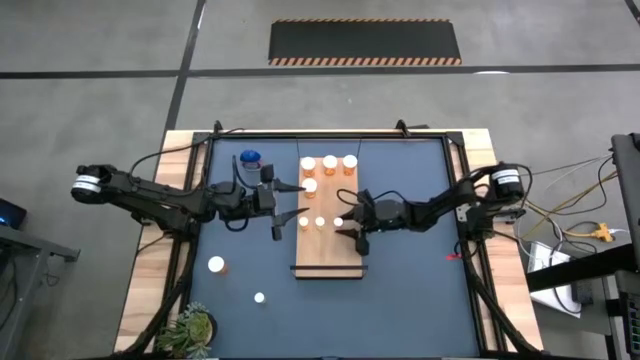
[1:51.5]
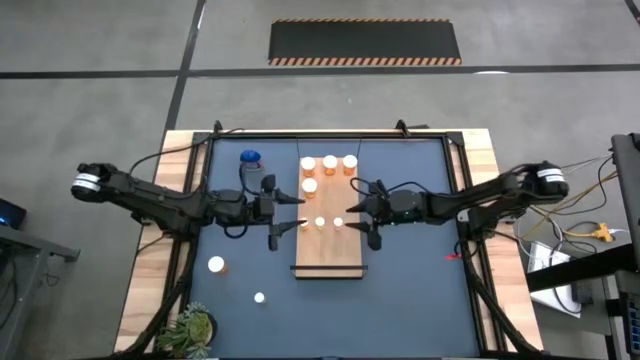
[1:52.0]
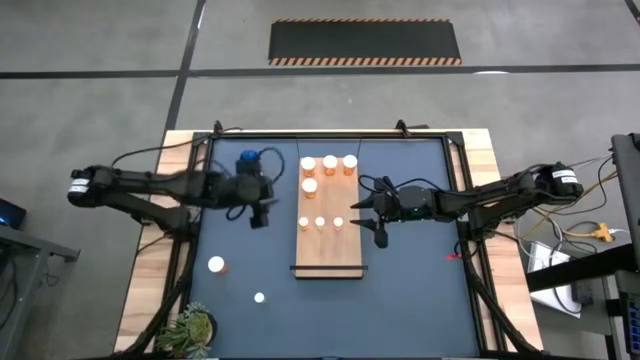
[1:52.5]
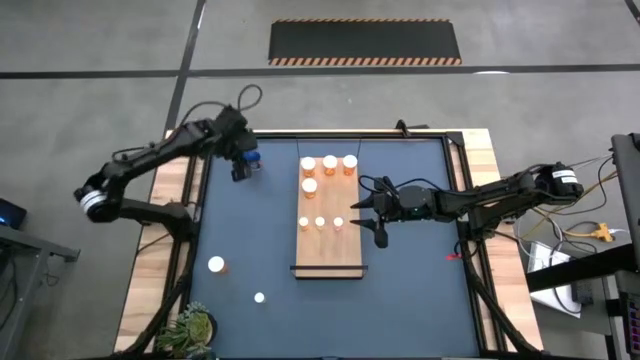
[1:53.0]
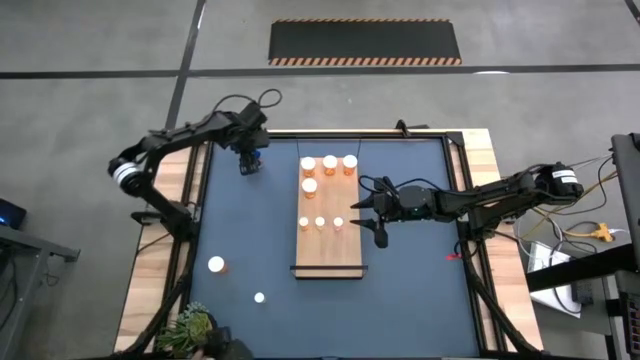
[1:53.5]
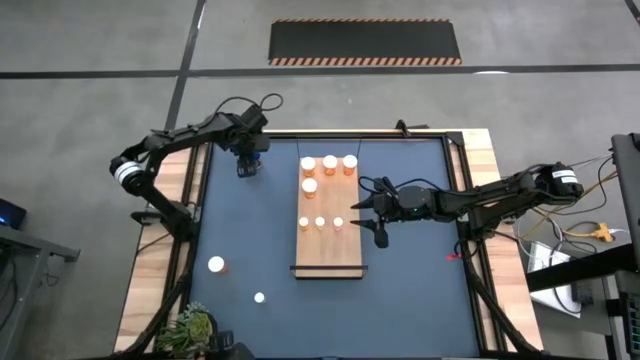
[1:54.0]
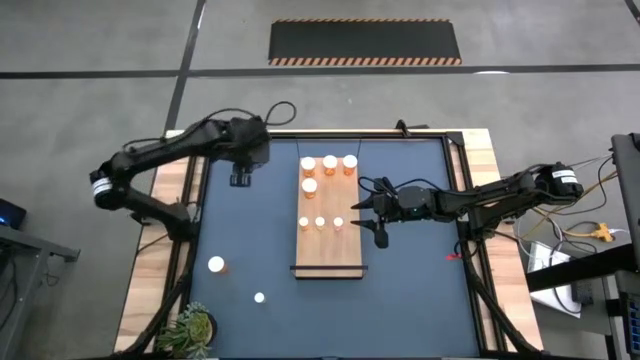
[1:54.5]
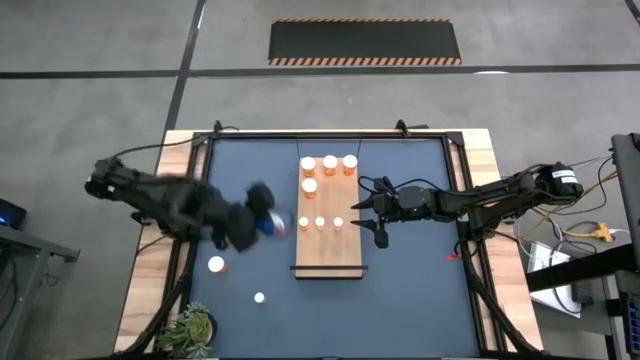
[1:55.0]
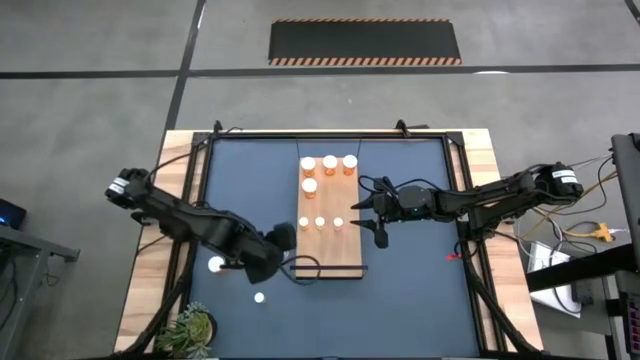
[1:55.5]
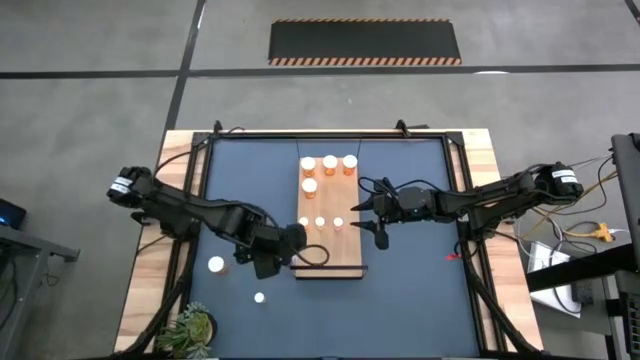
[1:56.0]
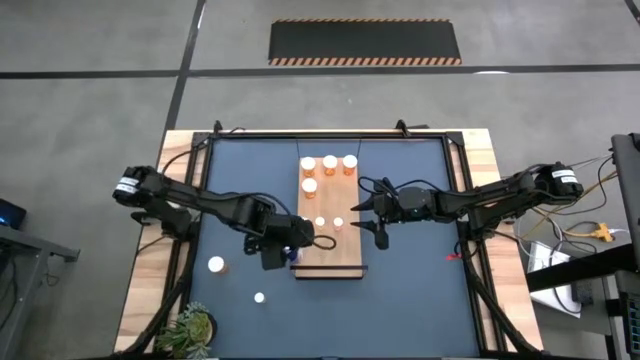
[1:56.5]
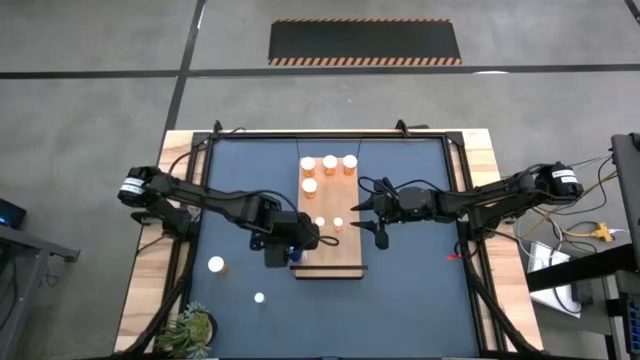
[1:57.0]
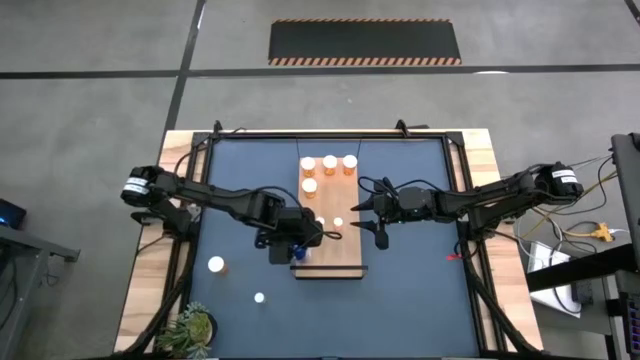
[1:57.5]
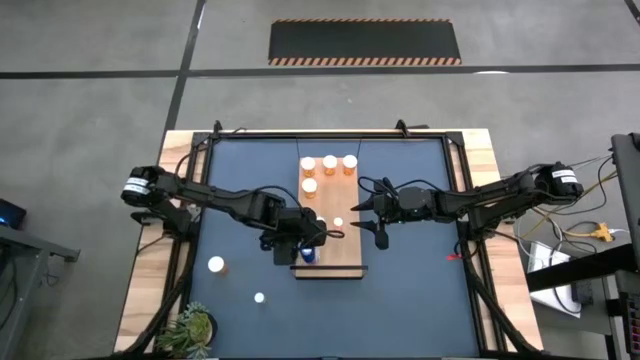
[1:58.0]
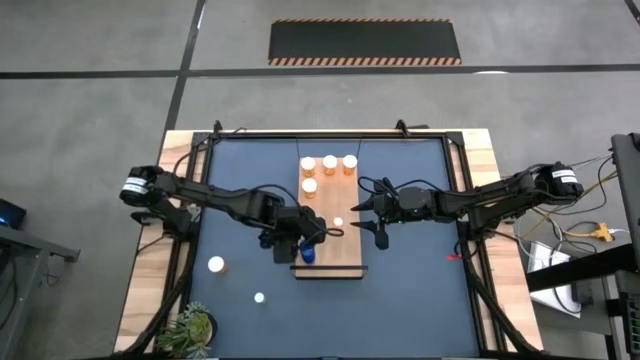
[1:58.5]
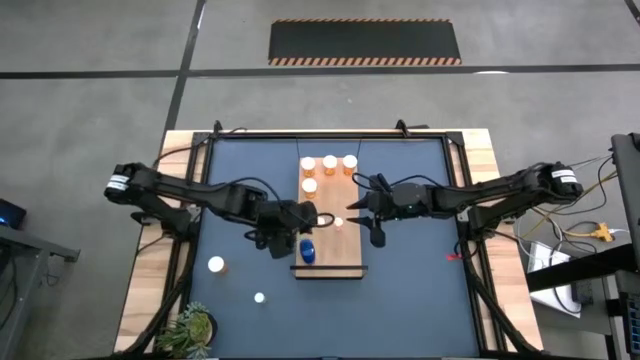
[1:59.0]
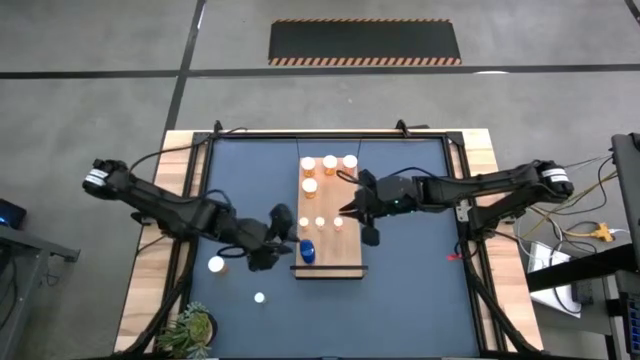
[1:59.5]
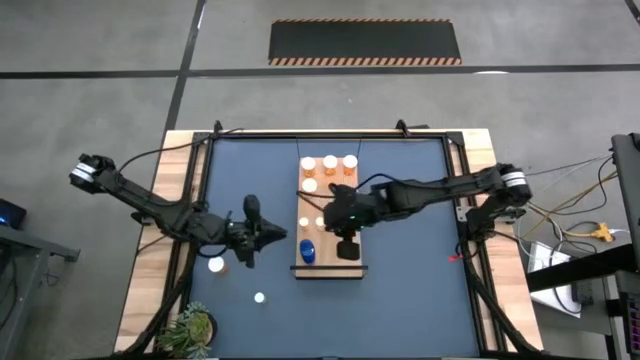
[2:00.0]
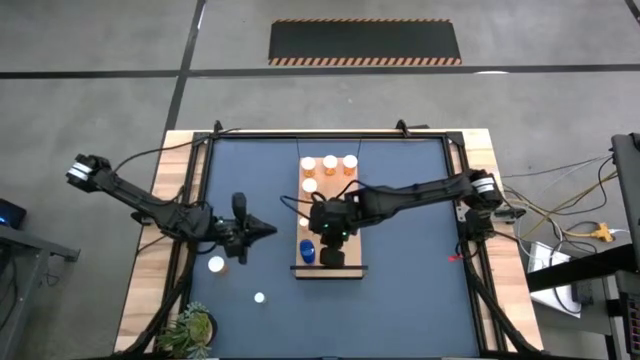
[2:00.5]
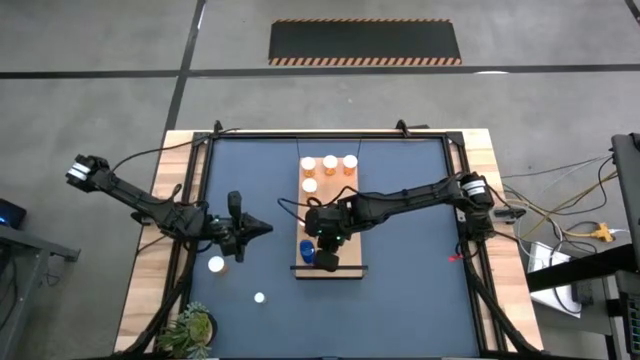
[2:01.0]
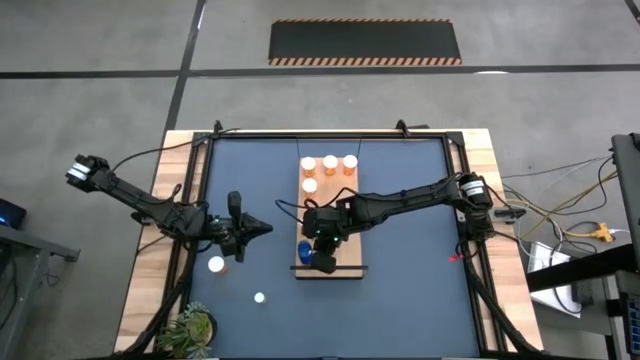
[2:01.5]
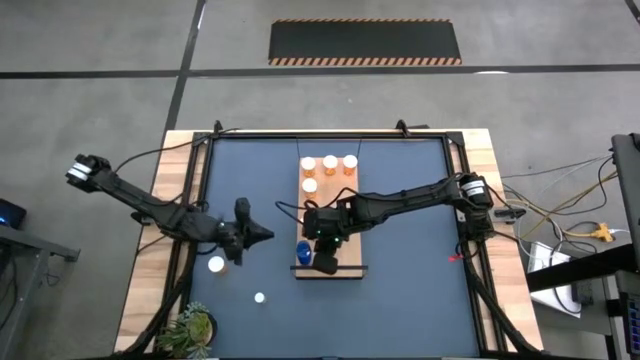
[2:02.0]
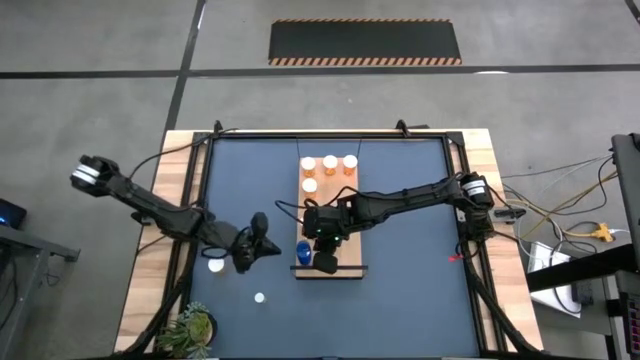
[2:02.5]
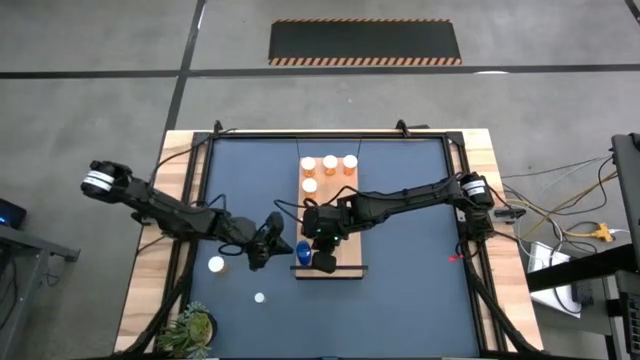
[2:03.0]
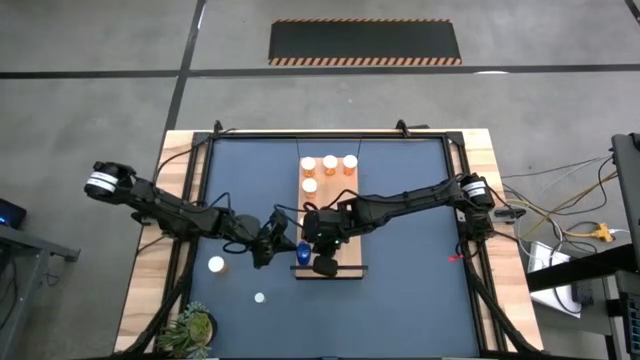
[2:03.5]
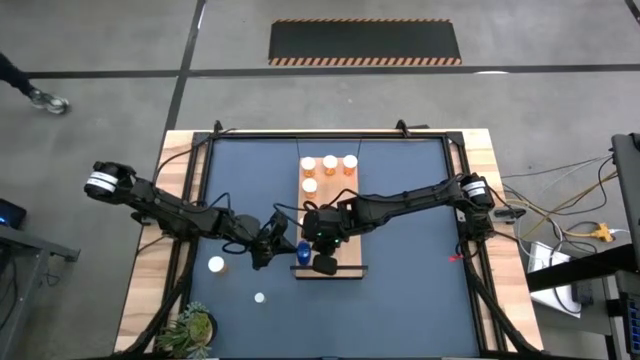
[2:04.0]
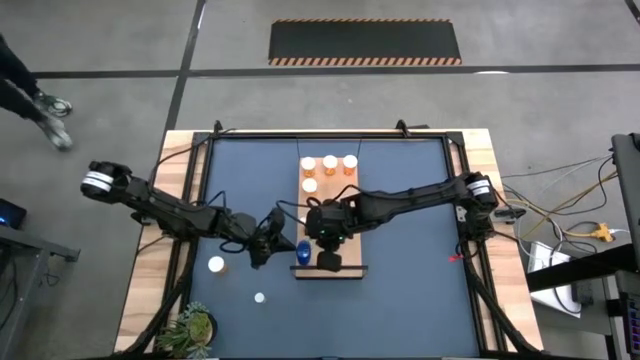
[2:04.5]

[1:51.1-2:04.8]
Task: Pick and place medicine bottles onto shelf by color
Put the blue pill bottle on the shelf

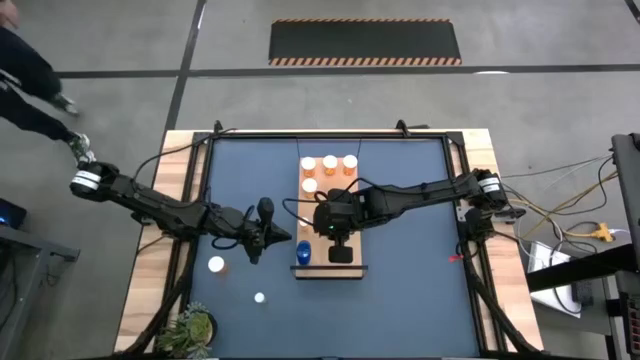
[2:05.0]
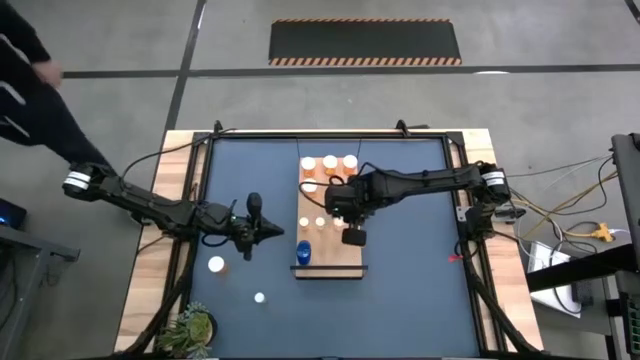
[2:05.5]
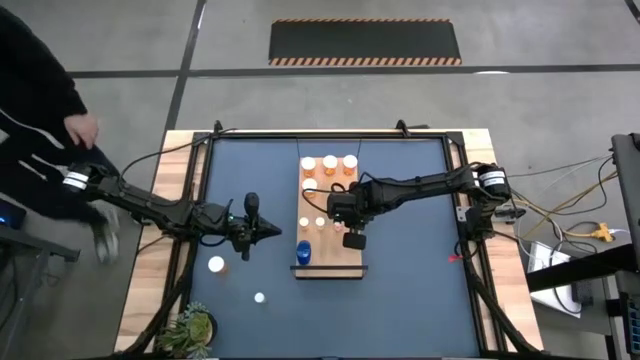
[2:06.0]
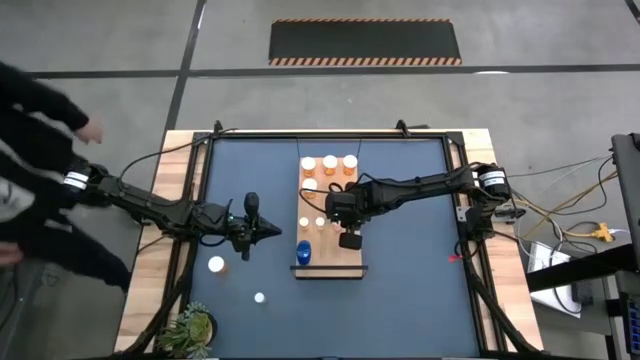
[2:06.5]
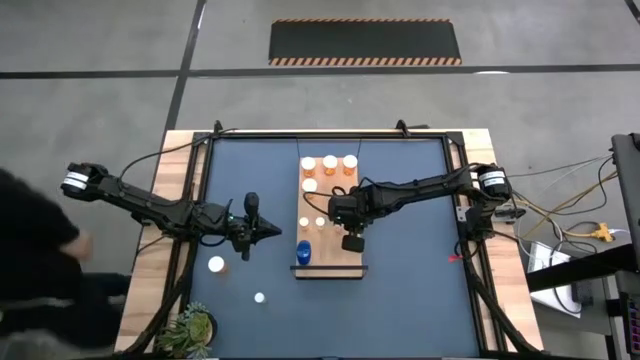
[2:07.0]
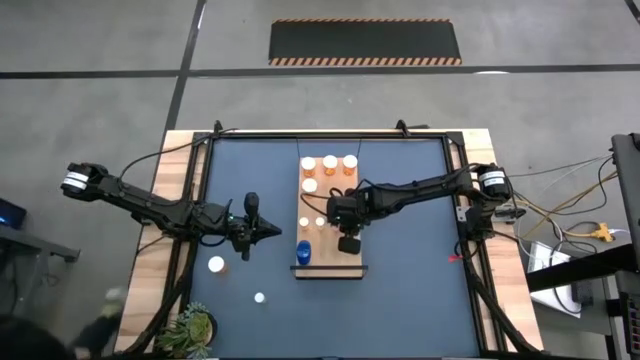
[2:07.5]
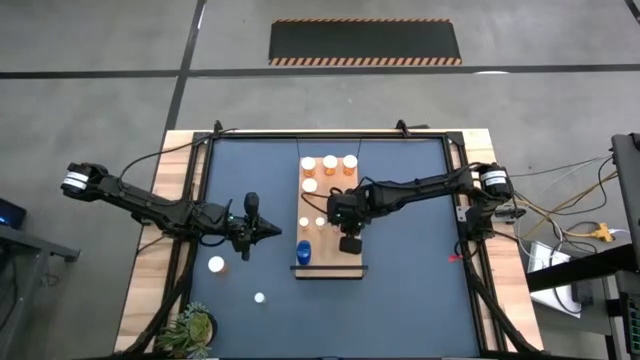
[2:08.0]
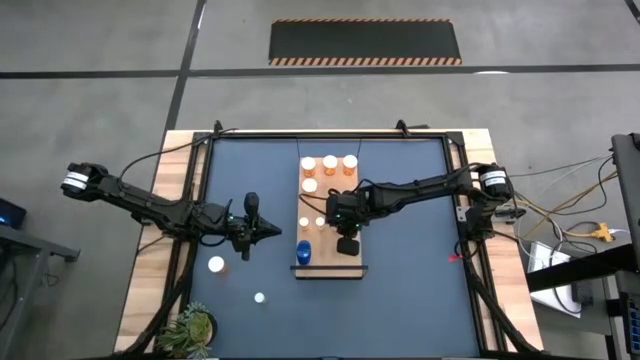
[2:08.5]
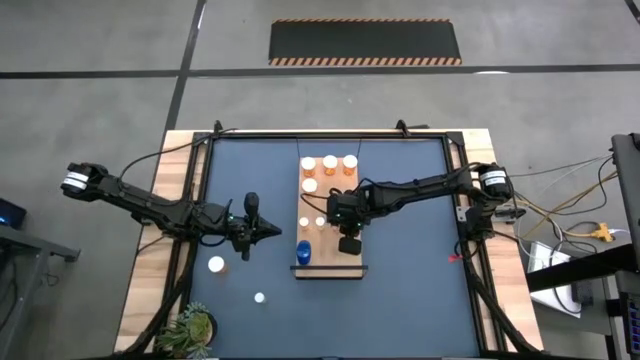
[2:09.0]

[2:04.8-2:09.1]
Adjust the small pink pill bottle on the shelf

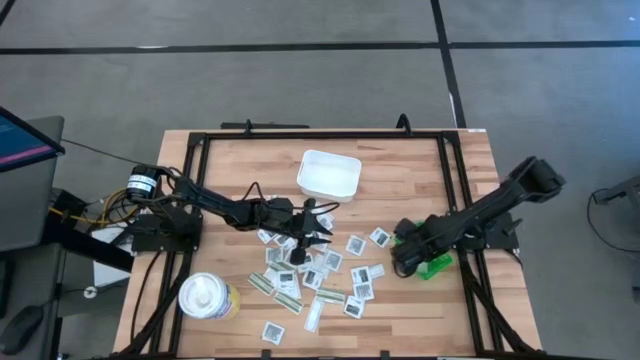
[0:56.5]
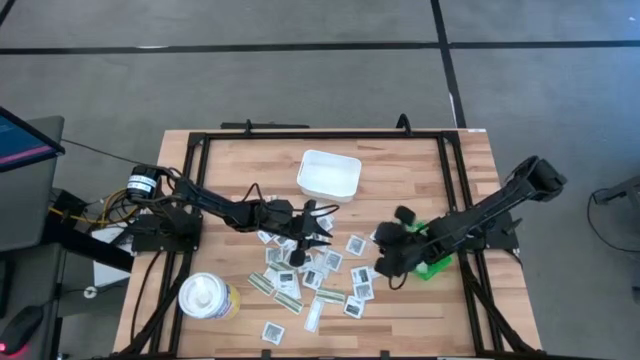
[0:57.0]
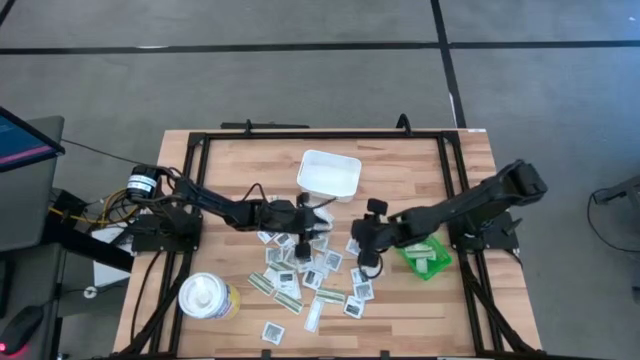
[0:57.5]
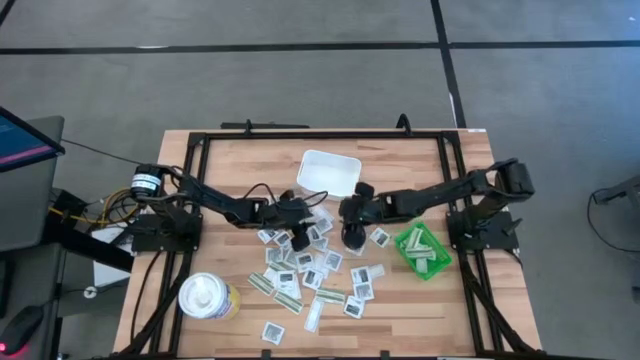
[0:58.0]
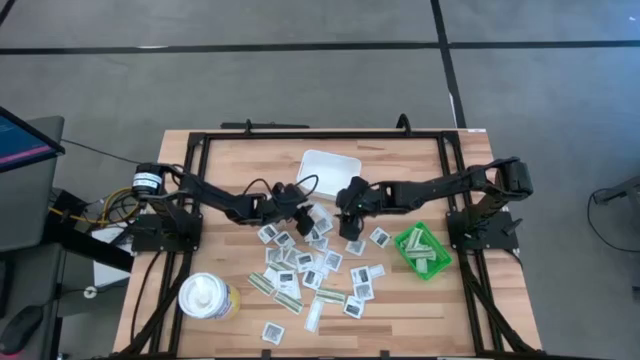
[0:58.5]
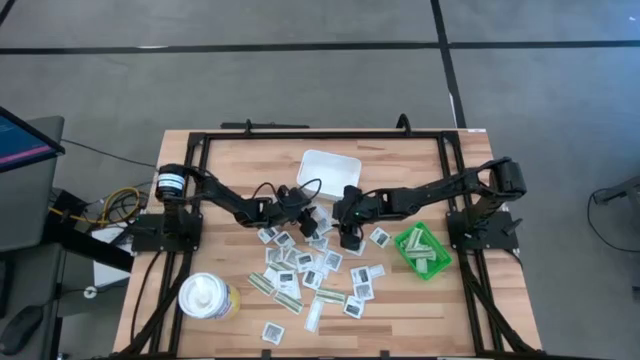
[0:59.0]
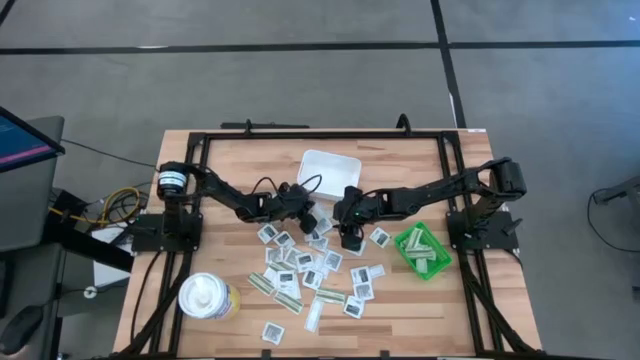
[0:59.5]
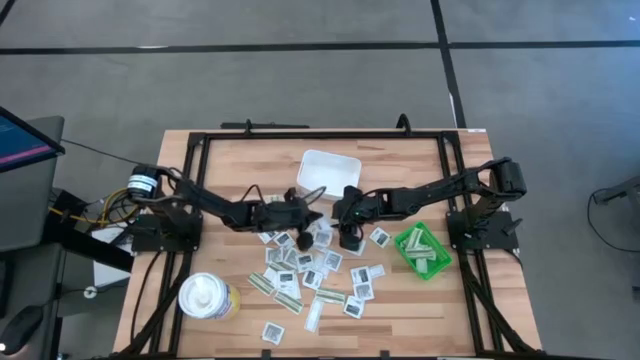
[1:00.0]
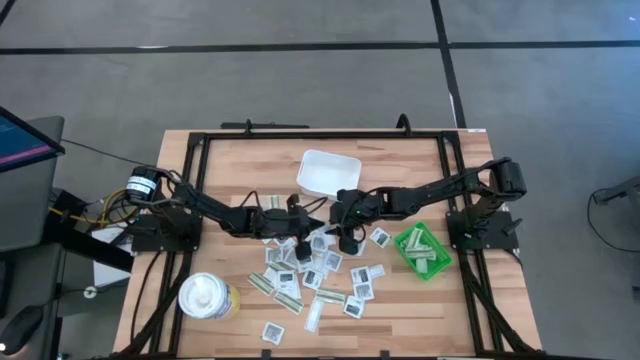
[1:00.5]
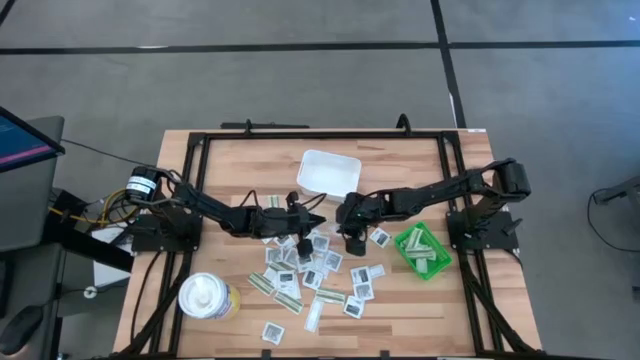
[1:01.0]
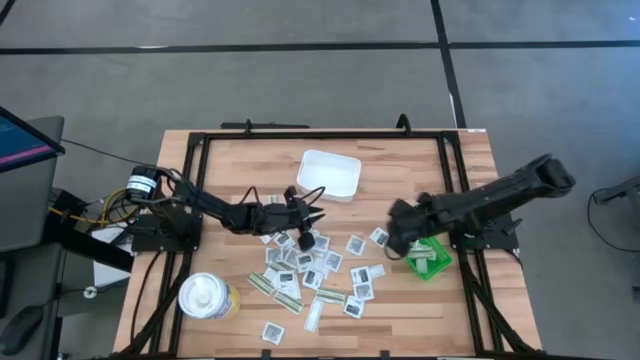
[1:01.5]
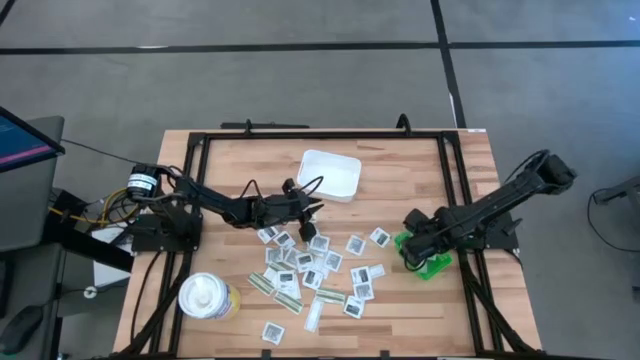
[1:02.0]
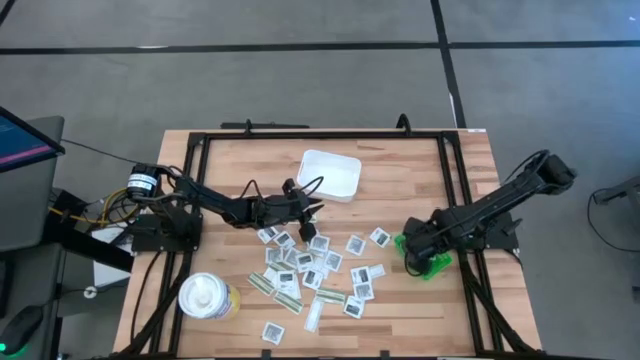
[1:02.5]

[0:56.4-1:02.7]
Task: Pick & Place First Aid Supplies
Put the bandage pack into the green bin
